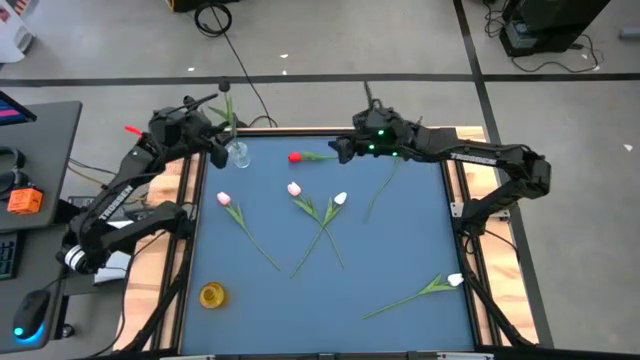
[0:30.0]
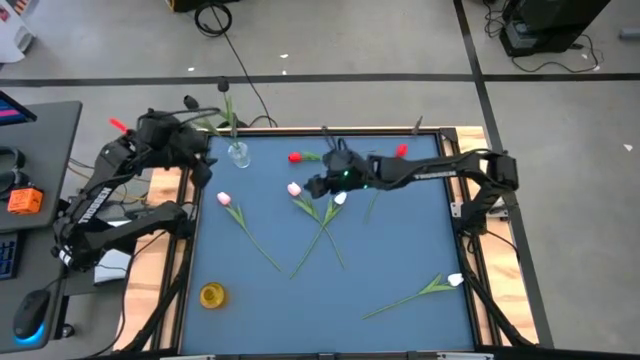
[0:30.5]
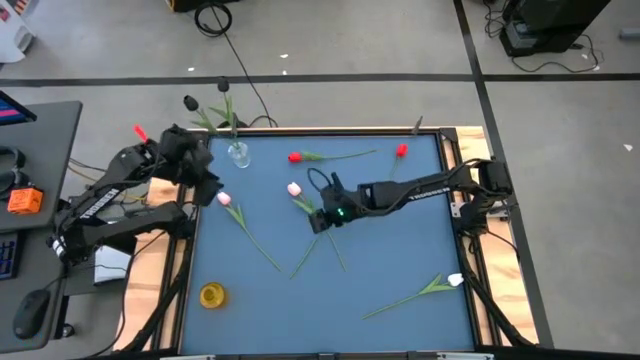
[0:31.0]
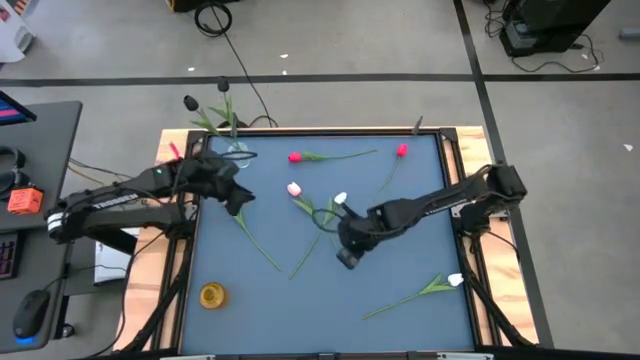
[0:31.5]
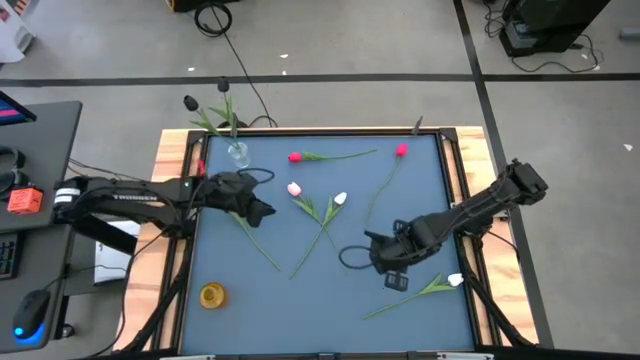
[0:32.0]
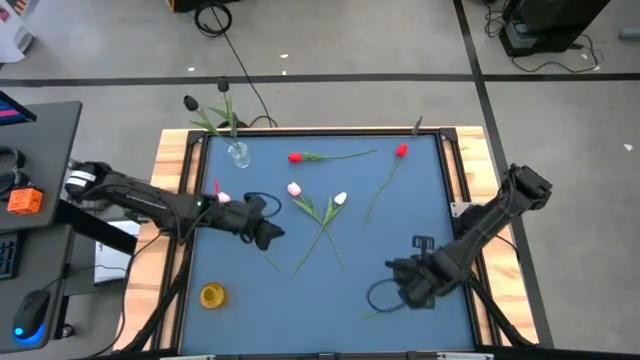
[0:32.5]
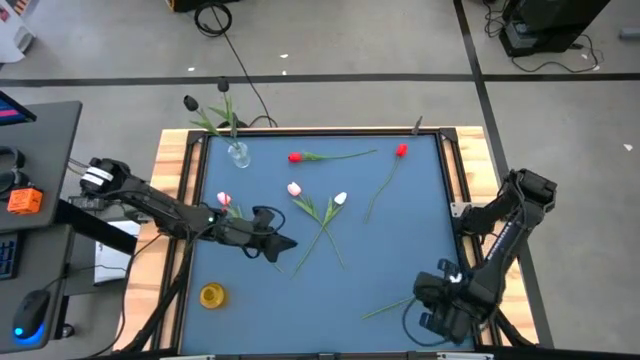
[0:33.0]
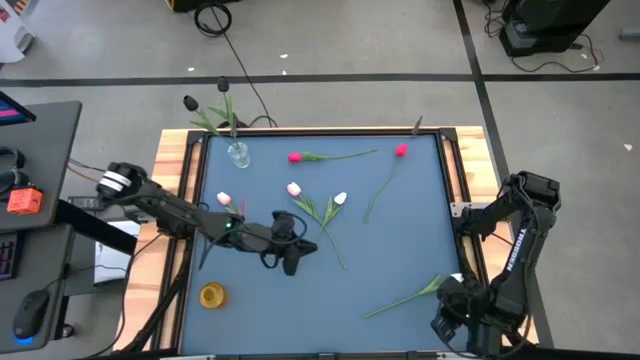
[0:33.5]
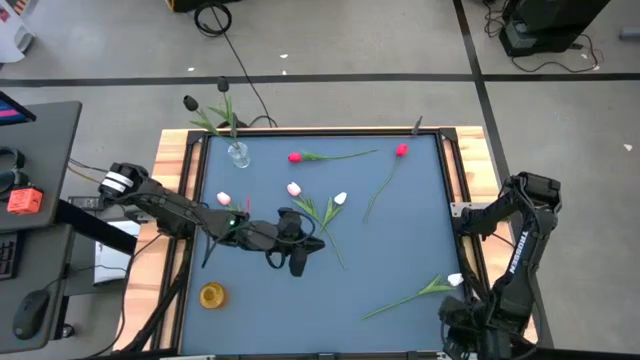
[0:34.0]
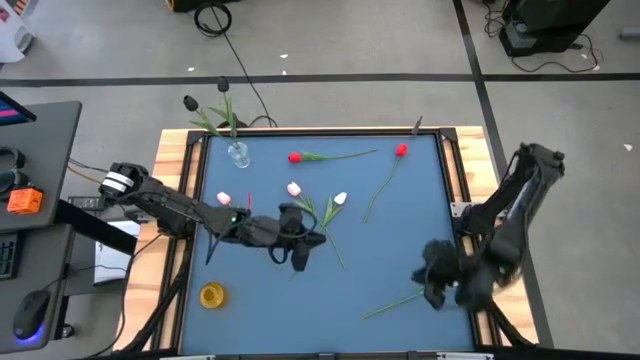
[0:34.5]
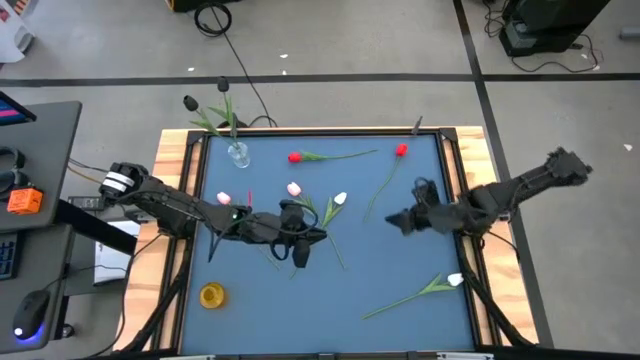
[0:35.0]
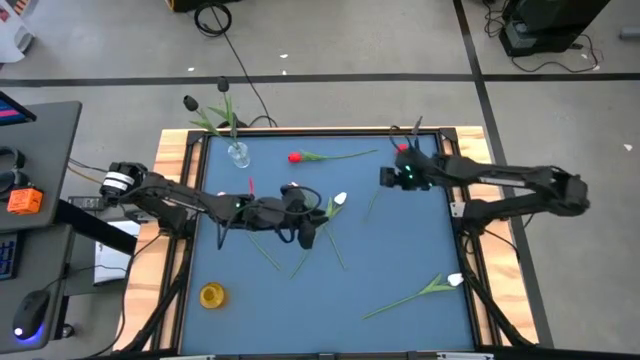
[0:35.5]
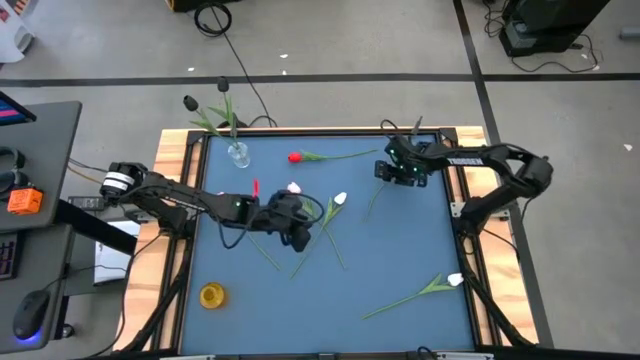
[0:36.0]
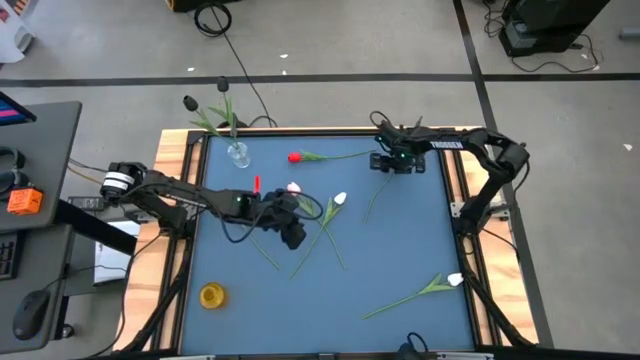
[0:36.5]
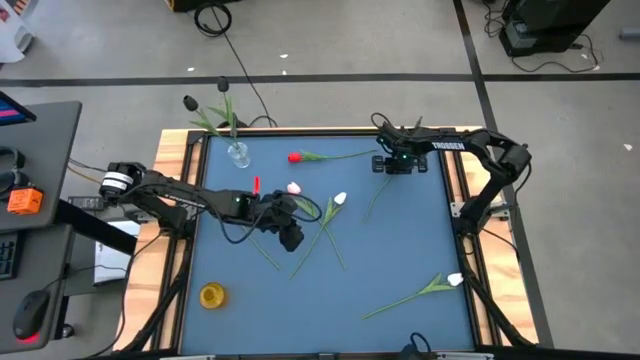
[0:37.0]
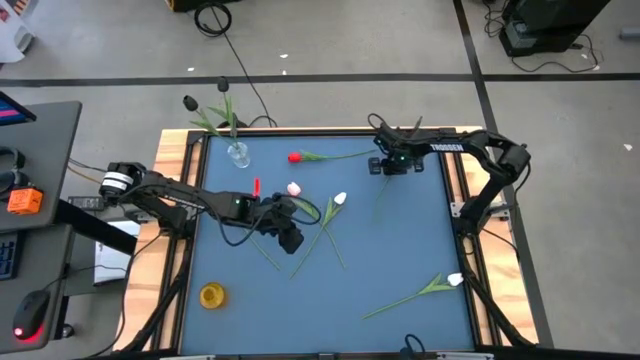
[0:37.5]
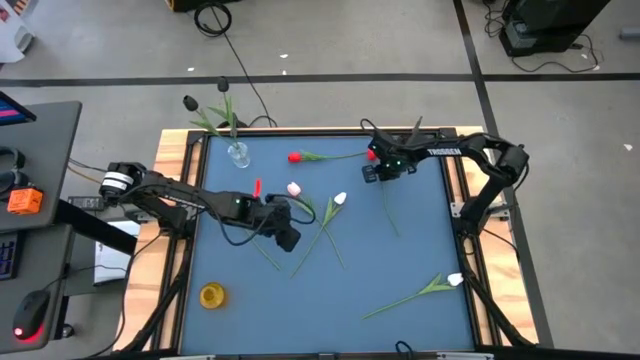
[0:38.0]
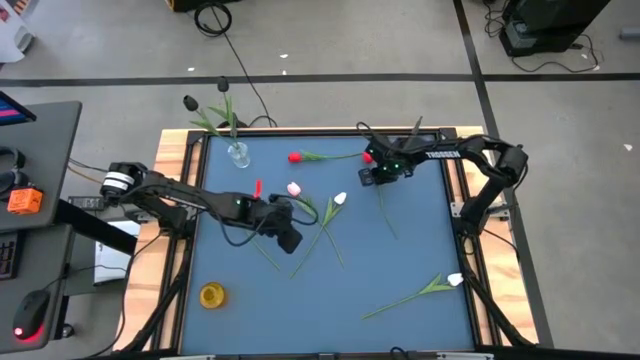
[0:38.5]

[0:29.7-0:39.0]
Task: Sort flowers into vase by color
Put the right red tulip into the yellow vase

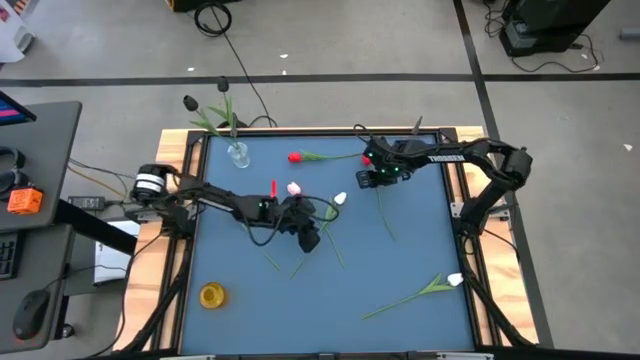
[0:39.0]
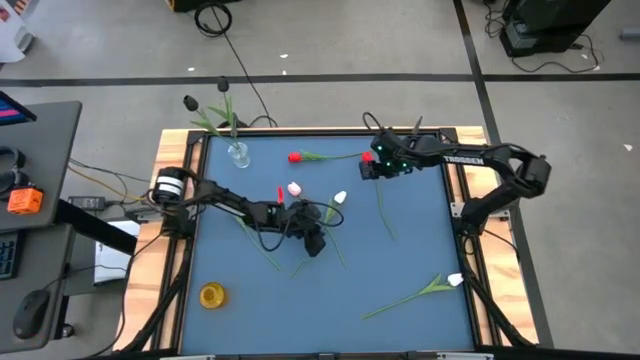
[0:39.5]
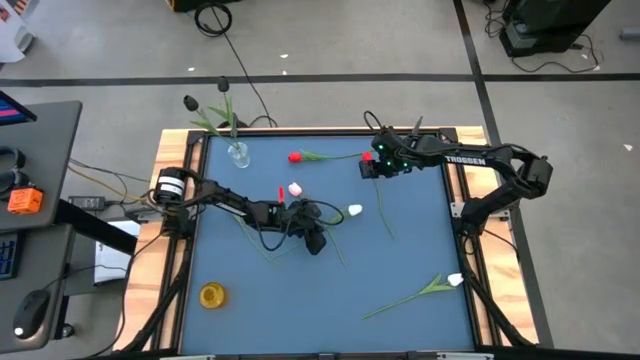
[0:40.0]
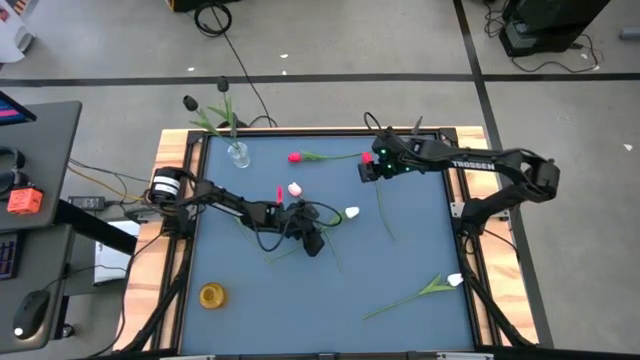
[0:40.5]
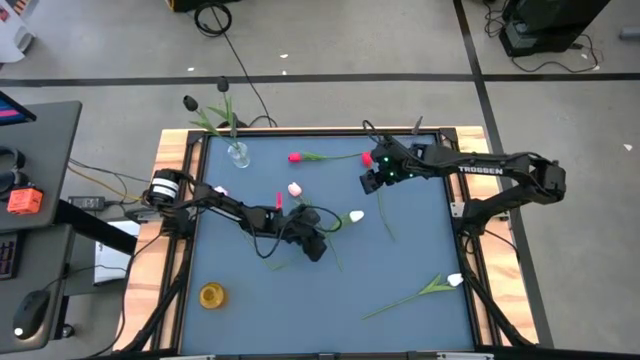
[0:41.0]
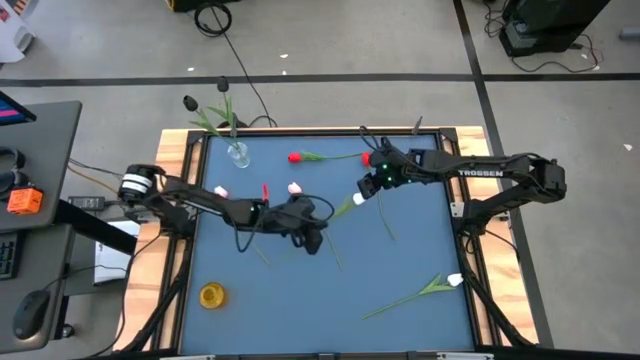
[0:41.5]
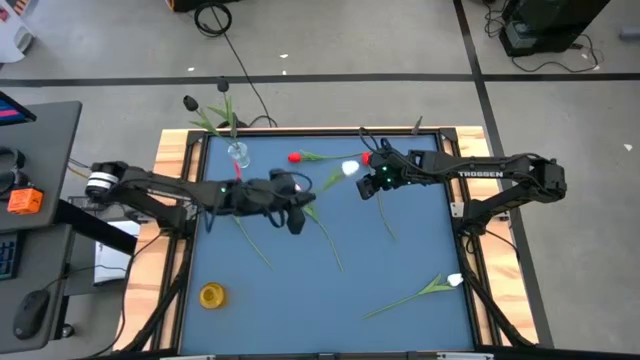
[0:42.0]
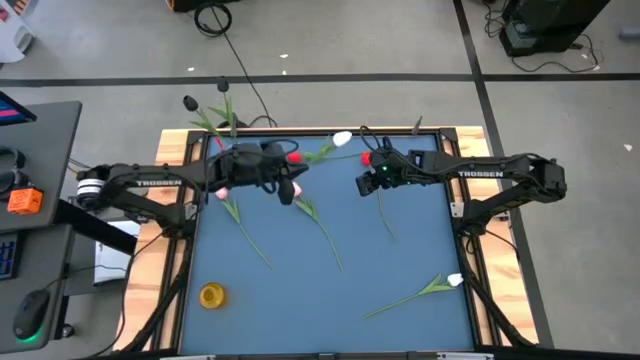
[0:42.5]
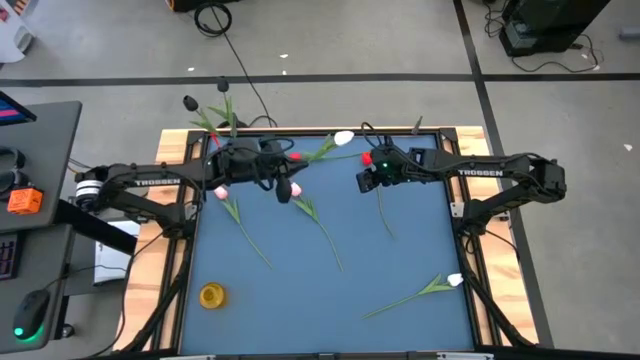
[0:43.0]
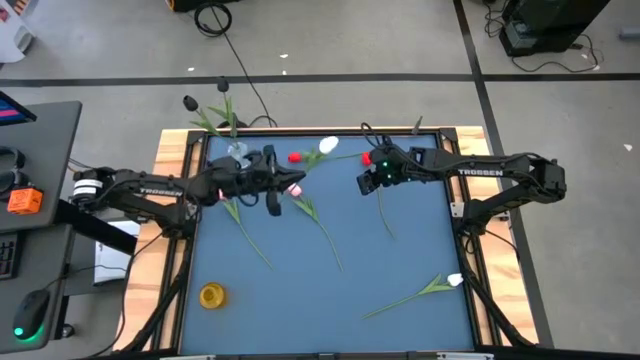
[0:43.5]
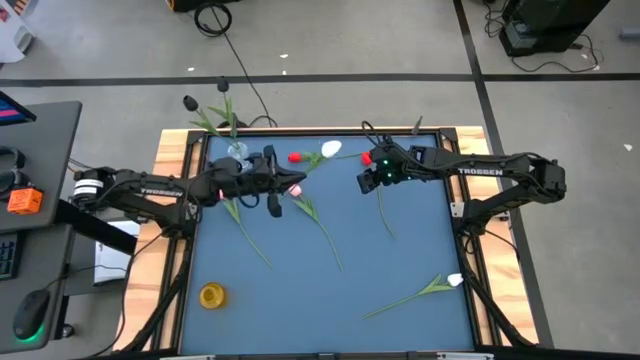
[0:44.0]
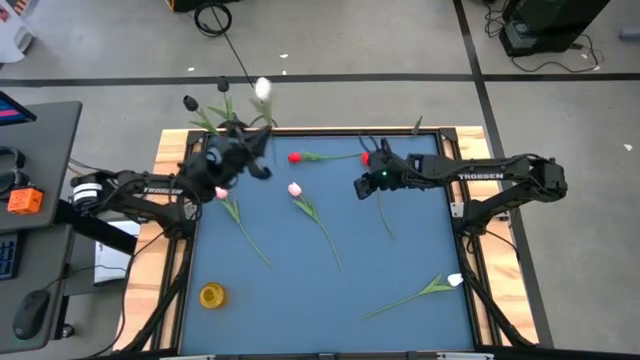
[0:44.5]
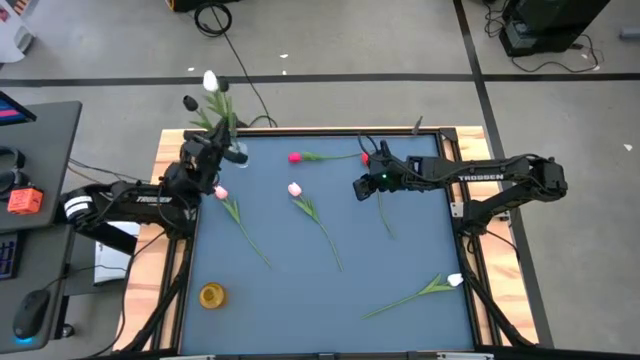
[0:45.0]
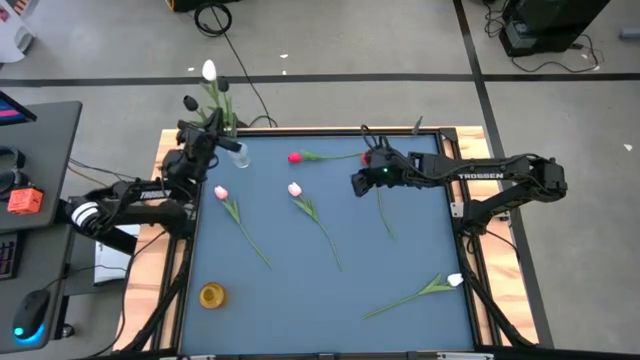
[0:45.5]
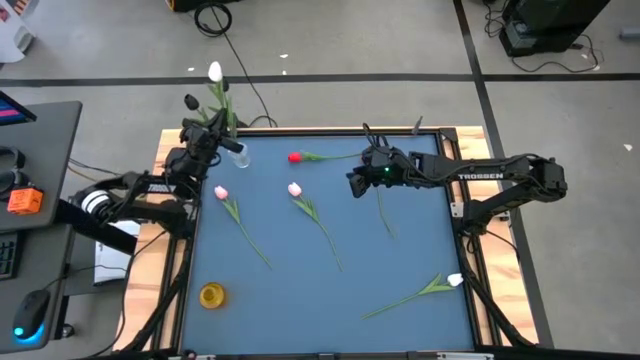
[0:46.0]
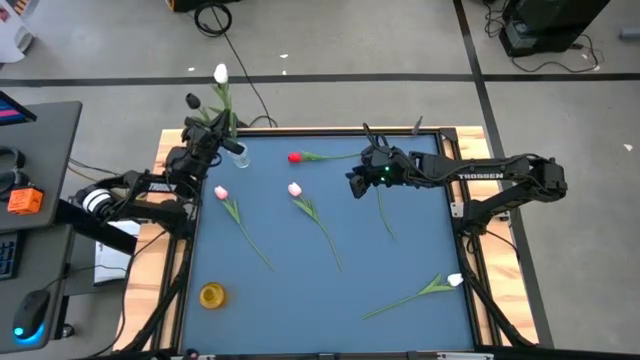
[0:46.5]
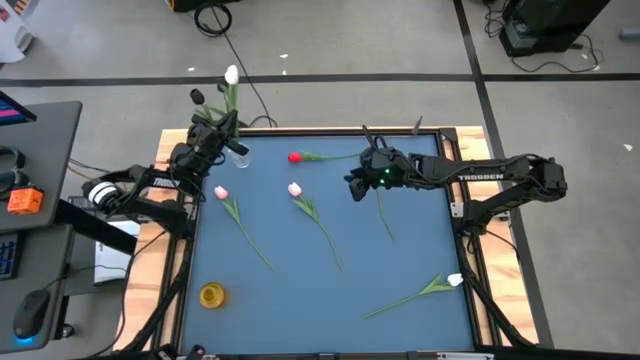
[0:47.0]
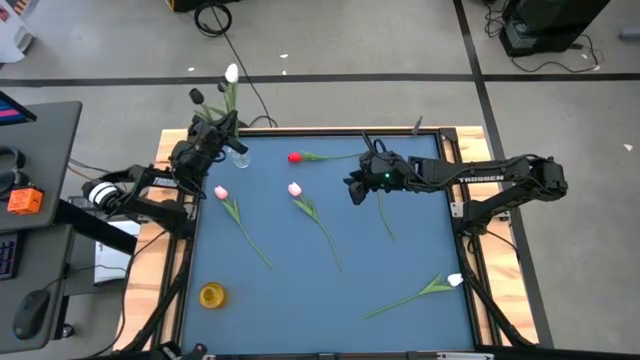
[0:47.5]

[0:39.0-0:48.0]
Put the top white tulip into the transparent vase
